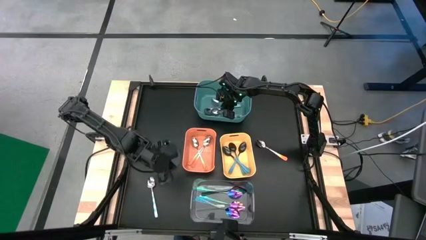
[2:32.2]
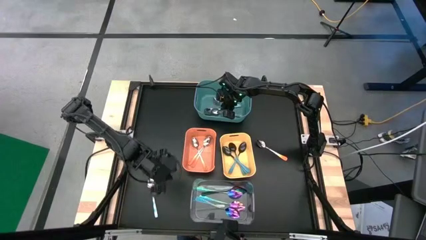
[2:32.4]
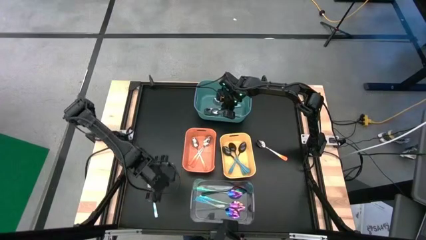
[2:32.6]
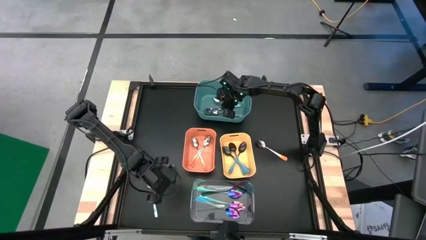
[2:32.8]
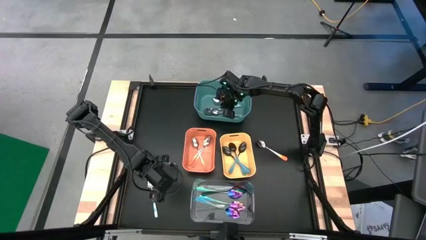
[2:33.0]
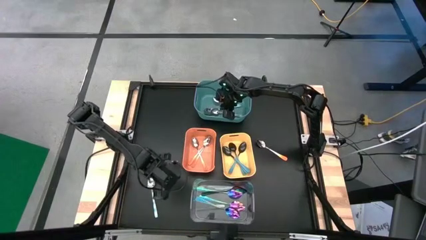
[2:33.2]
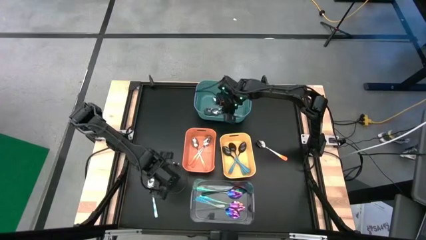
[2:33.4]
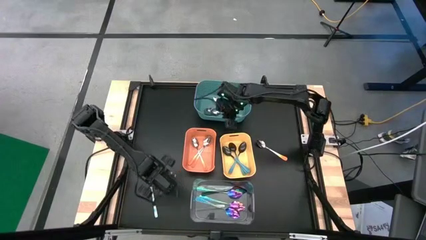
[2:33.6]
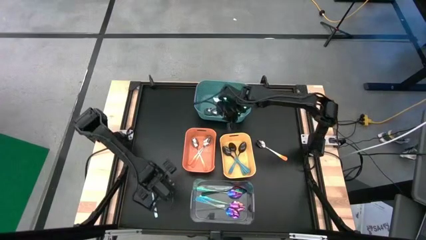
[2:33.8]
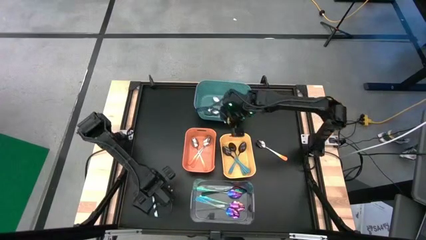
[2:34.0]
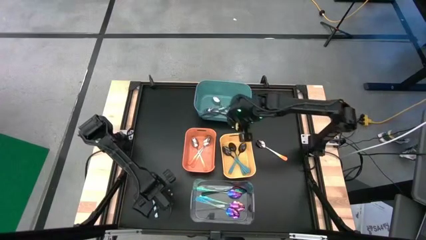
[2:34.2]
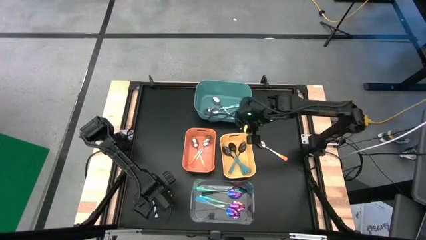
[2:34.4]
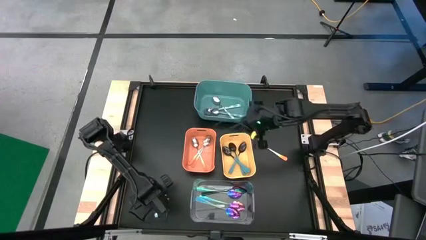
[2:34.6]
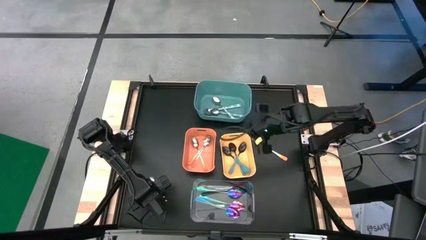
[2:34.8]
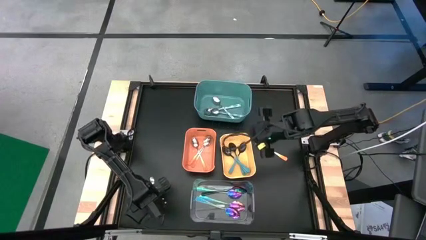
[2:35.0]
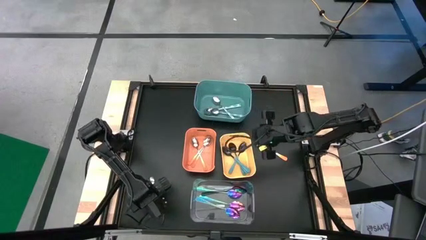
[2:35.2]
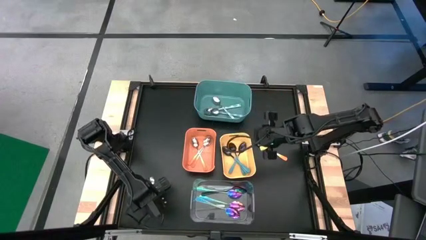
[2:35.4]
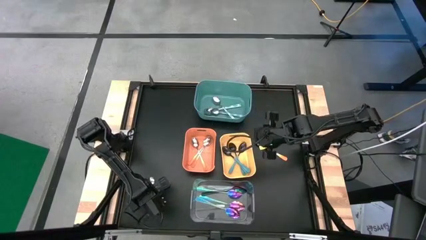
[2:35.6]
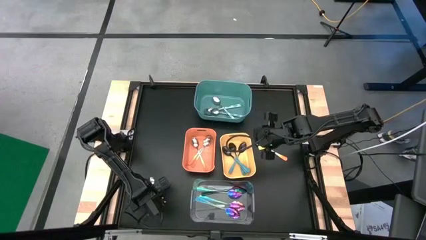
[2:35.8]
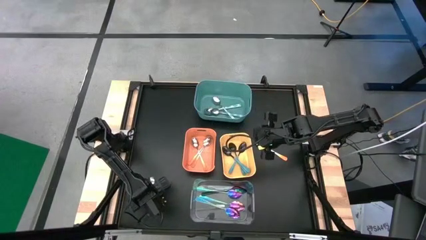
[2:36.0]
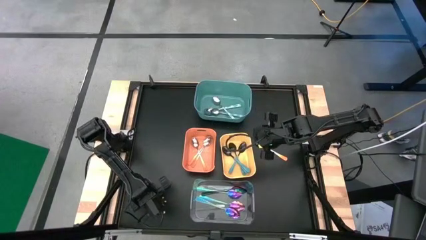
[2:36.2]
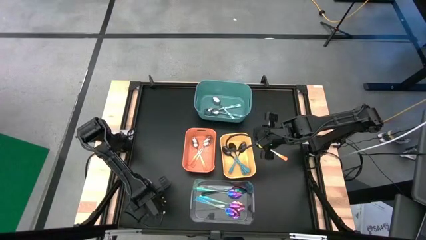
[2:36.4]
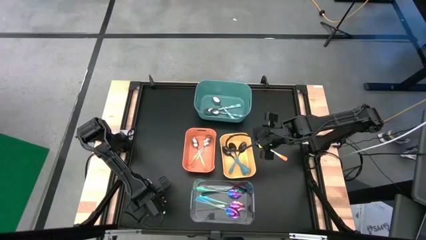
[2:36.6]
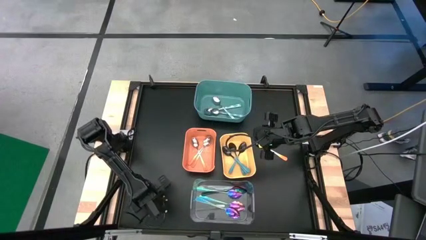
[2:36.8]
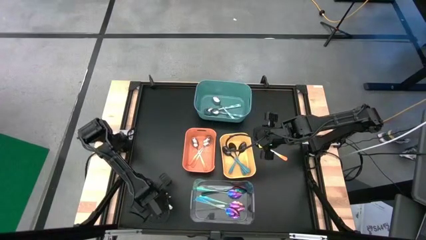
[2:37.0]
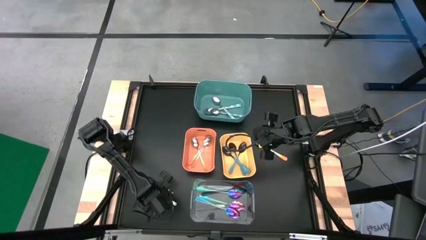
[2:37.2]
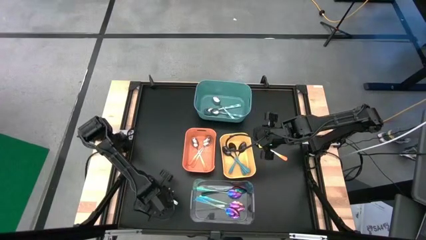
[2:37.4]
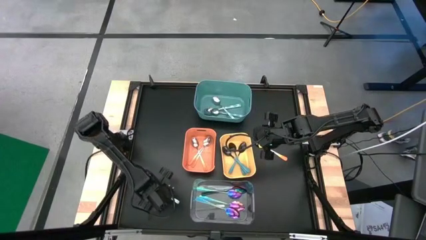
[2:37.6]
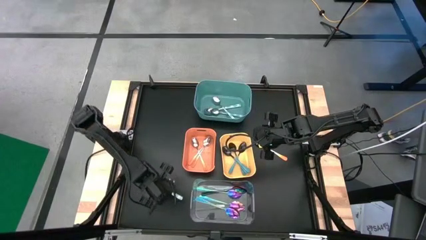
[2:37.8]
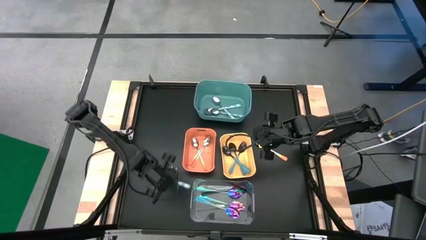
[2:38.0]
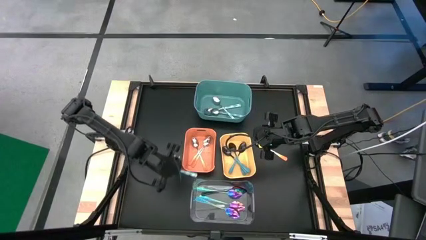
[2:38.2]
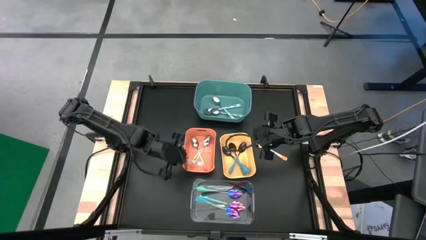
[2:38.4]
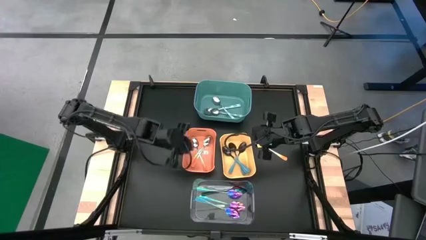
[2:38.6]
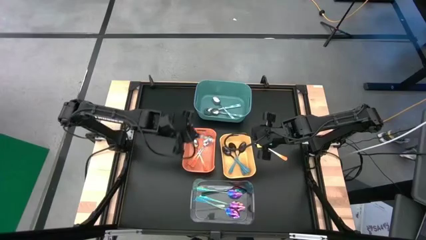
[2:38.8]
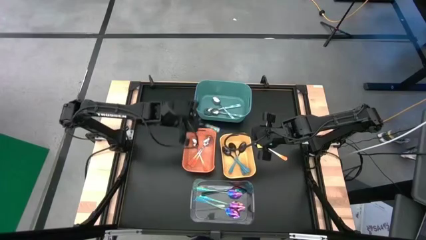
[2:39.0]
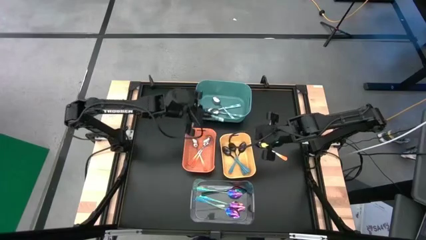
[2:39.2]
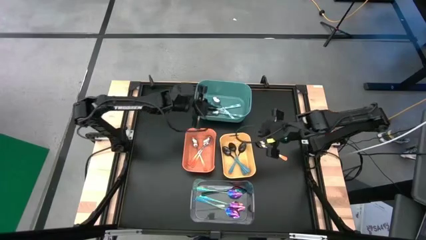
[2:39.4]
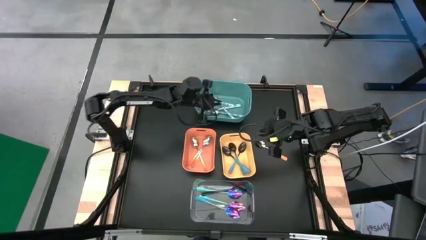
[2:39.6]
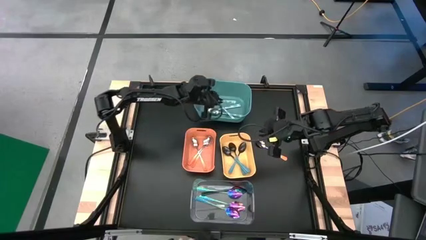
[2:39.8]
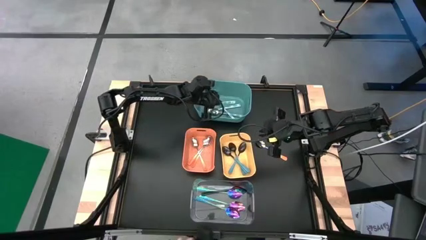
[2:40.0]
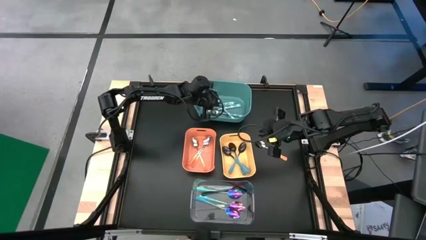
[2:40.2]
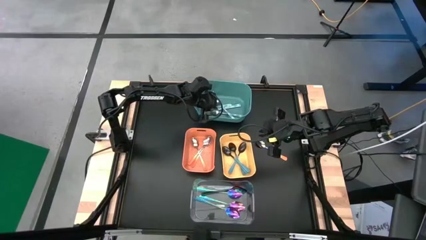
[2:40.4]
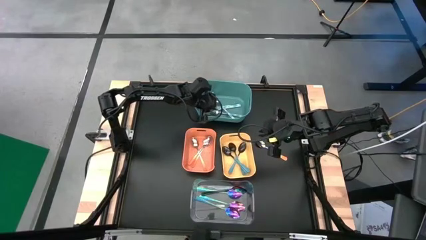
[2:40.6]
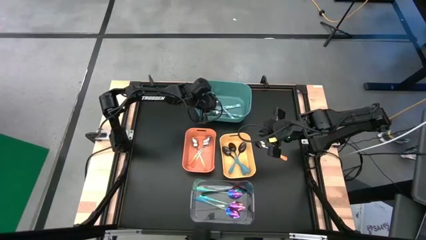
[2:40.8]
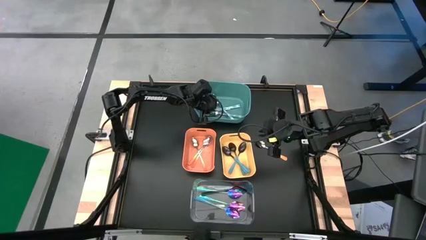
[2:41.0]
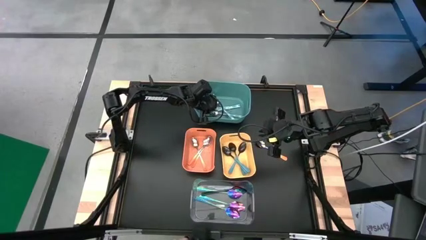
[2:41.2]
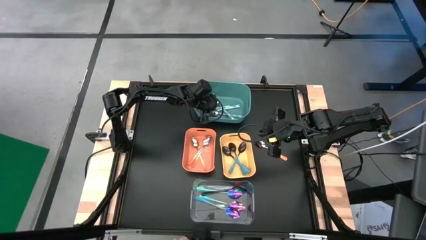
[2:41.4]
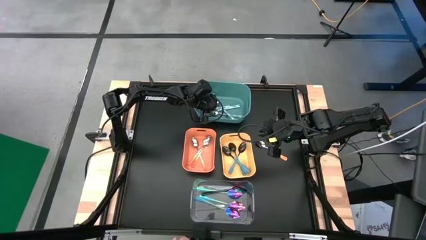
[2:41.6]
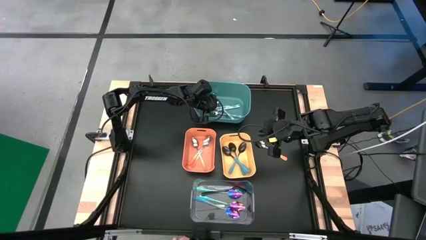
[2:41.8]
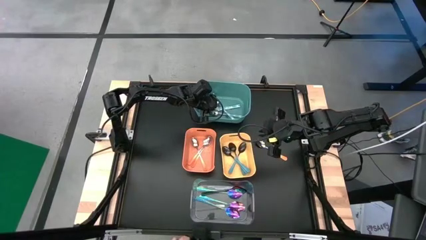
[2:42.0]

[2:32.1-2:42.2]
Task: Sort silverware by color (type)
Put the white patterned spoon into the green bin

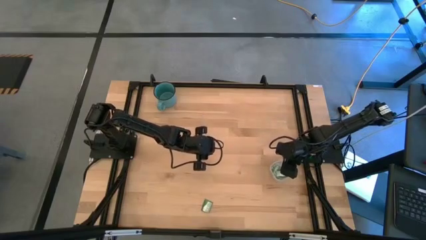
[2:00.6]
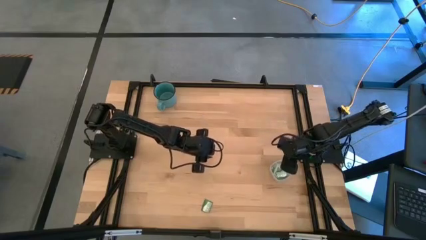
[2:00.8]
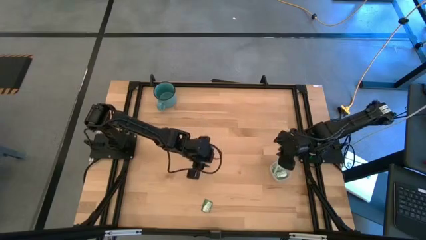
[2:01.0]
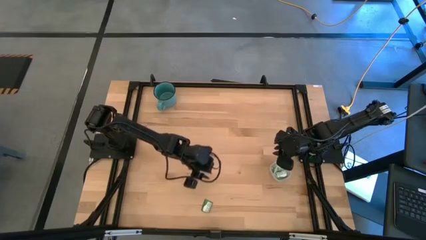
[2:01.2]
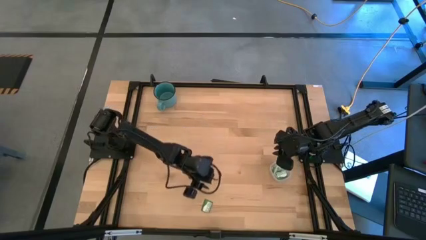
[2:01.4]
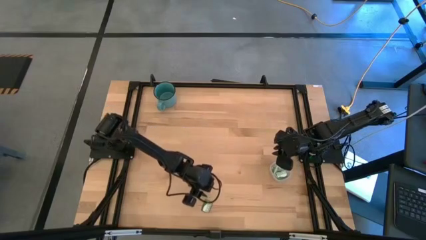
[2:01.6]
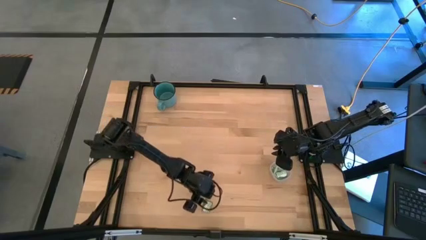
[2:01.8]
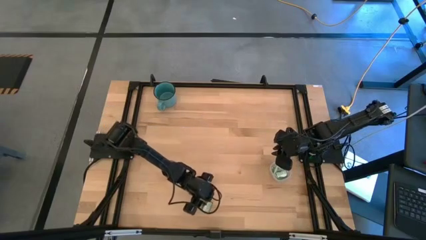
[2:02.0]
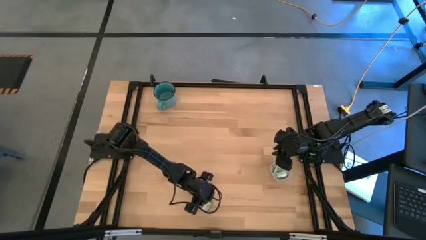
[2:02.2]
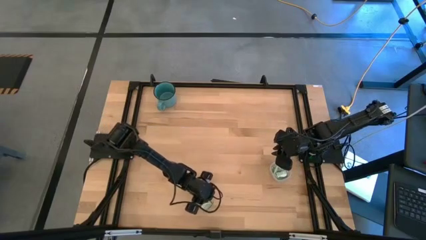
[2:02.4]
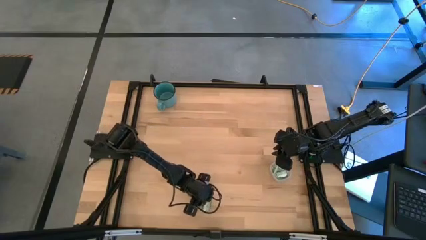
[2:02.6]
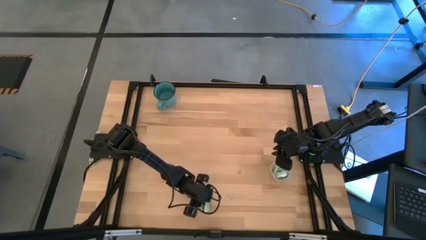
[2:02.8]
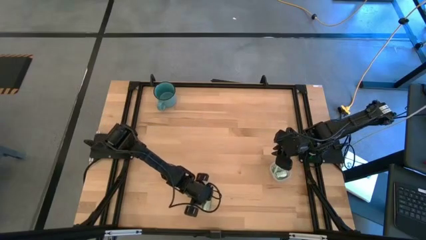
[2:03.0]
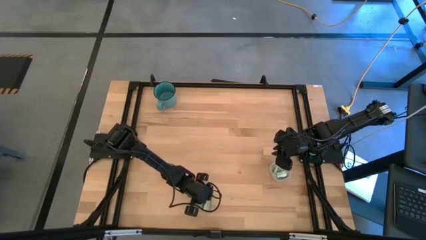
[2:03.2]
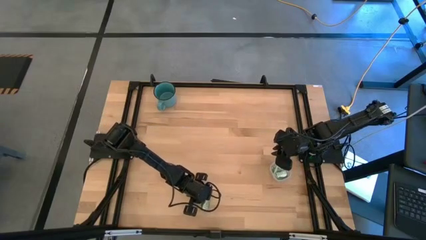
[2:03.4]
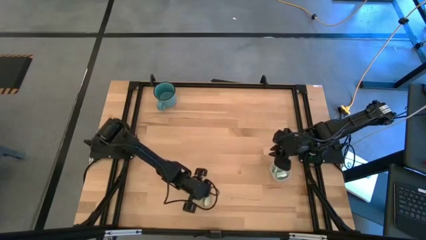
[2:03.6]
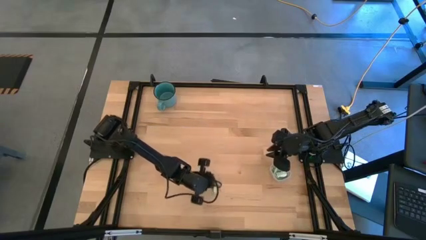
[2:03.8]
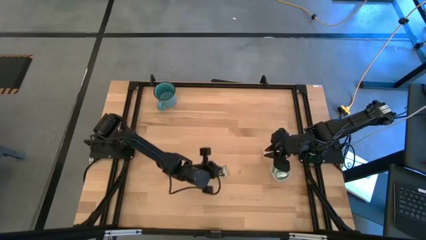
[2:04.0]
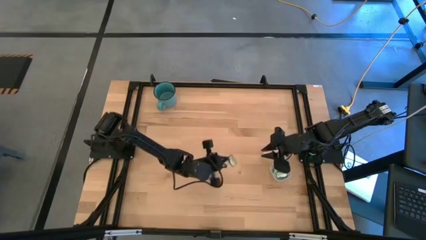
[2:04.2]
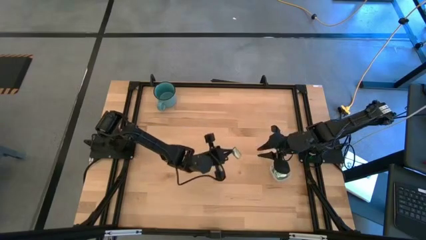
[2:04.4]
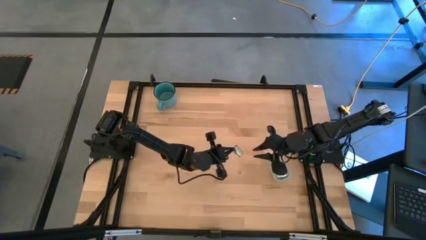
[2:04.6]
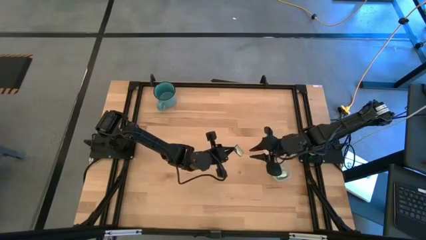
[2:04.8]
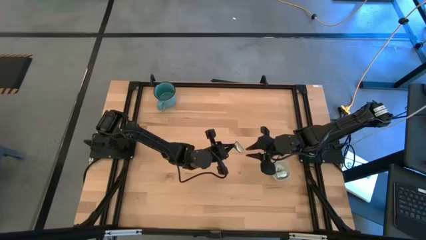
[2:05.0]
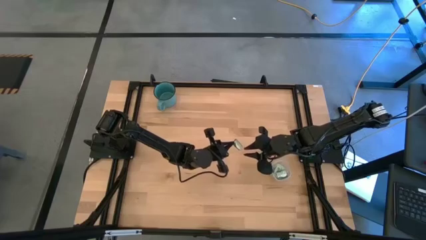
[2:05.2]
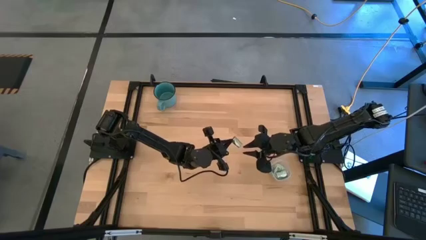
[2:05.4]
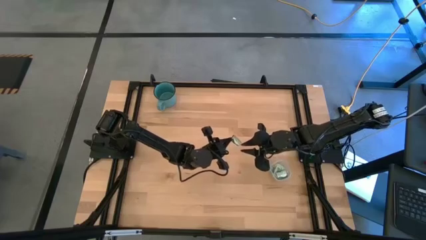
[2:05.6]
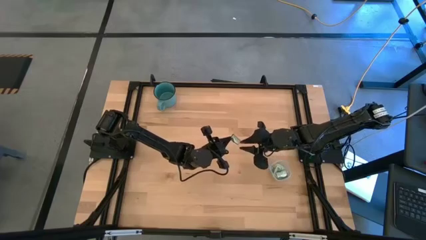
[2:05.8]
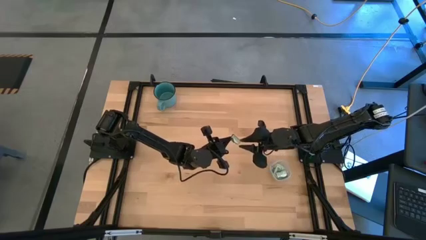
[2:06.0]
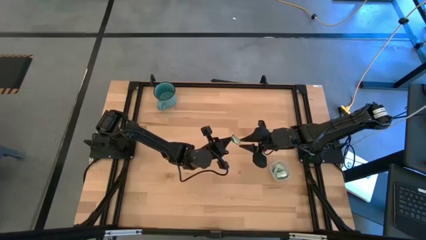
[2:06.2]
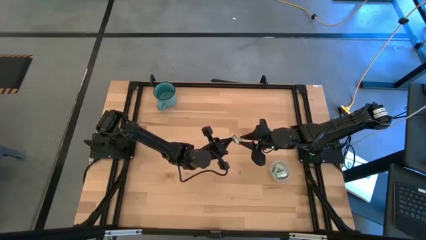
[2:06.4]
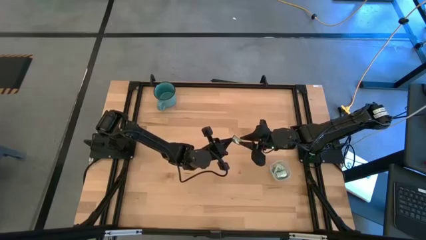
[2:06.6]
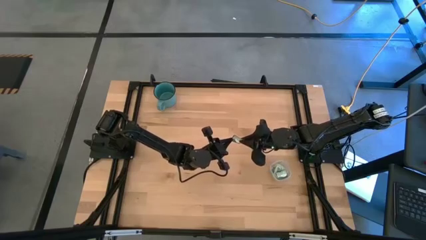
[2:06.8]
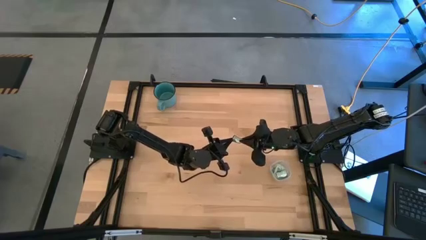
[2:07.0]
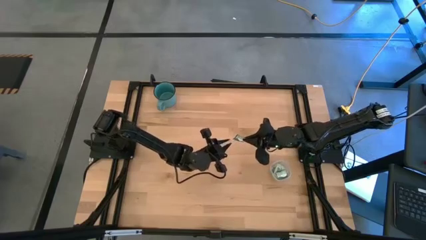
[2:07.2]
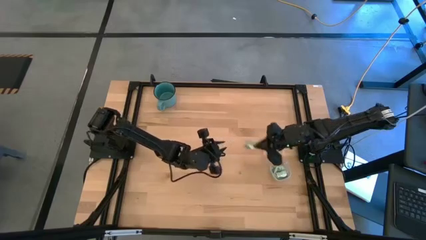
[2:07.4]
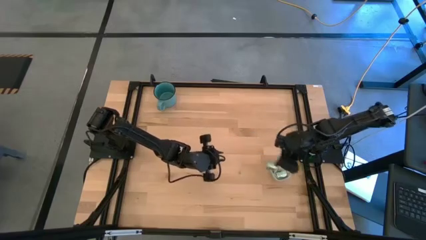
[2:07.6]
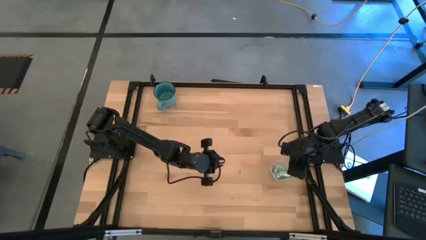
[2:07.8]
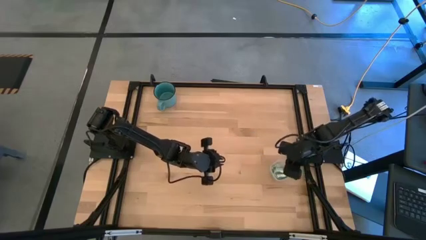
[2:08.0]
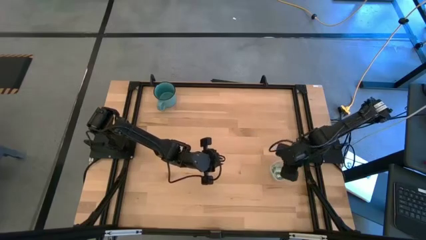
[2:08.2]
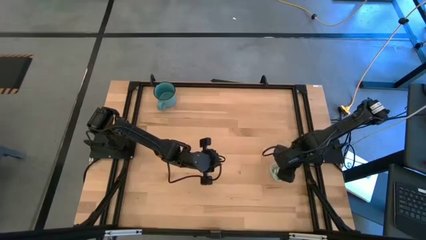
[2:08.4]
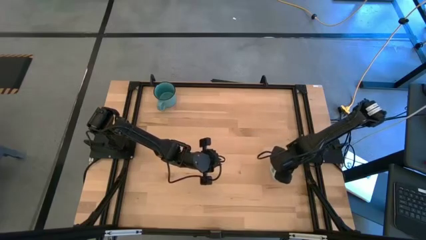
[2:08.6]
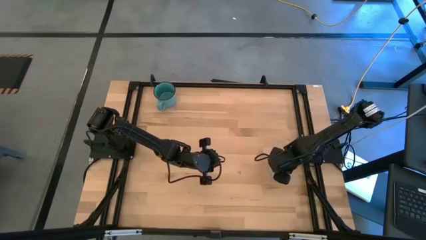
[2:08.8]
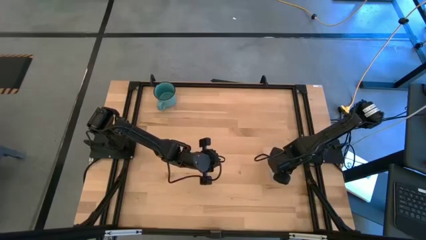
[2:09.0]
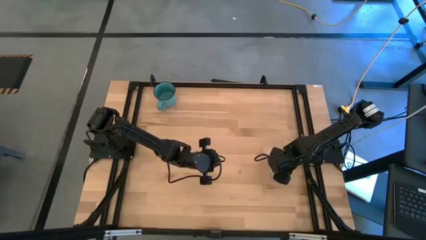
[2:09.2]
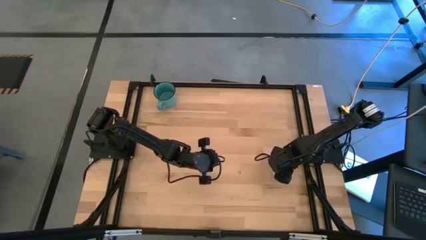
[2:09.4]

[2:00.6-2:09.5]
Task: Pick and place items into bin
Put the green stevia packet into the transparent bin
